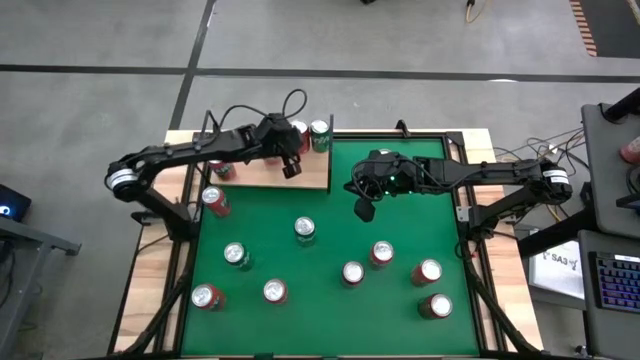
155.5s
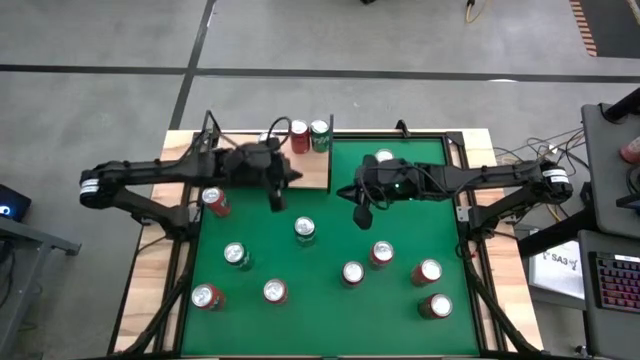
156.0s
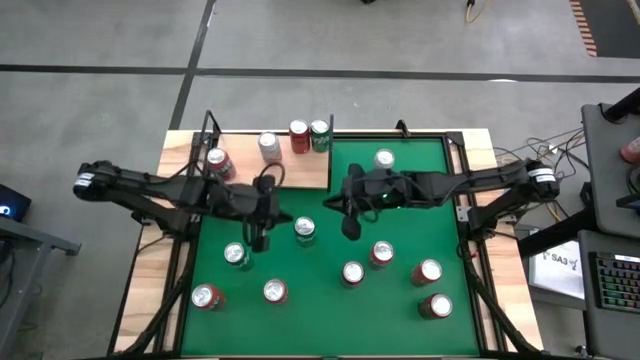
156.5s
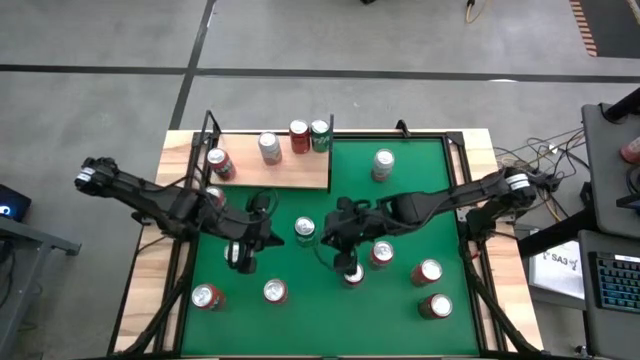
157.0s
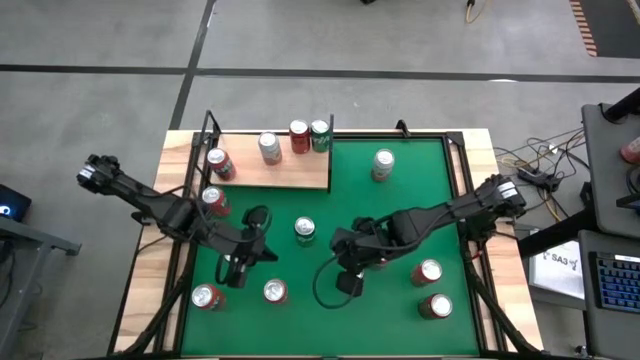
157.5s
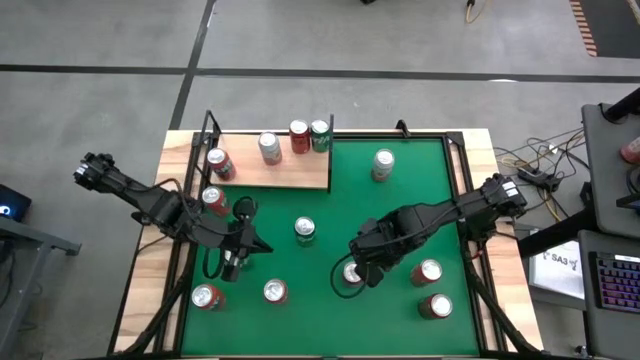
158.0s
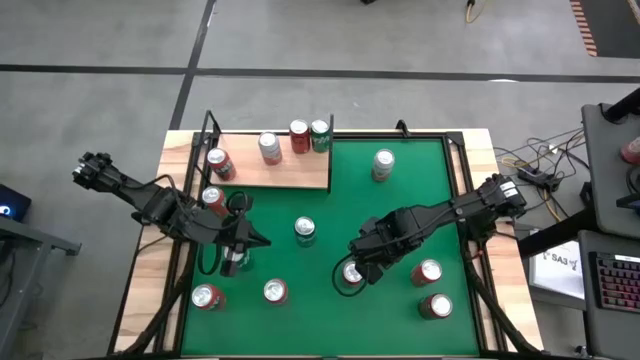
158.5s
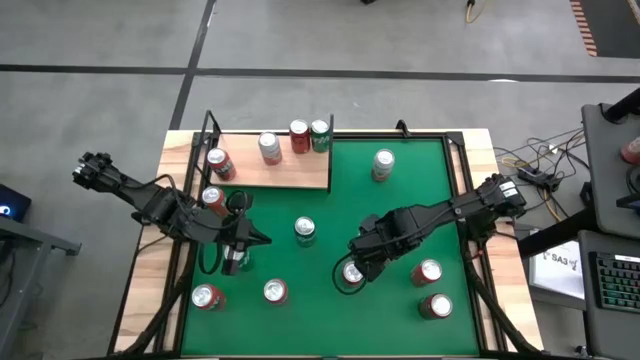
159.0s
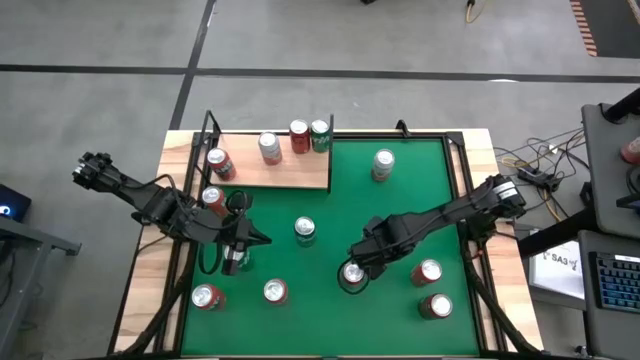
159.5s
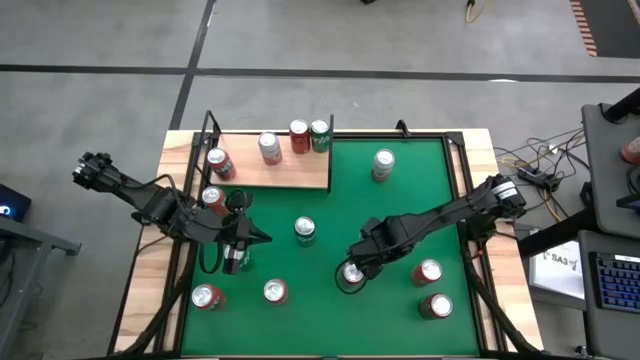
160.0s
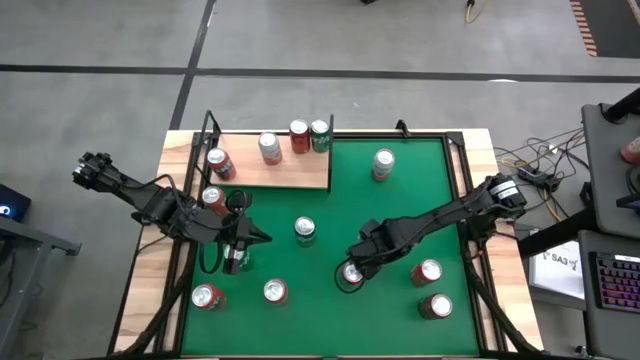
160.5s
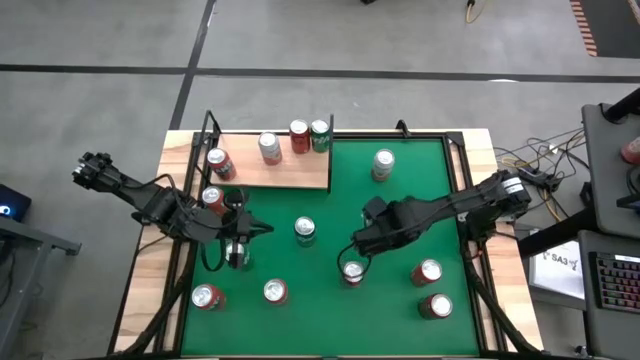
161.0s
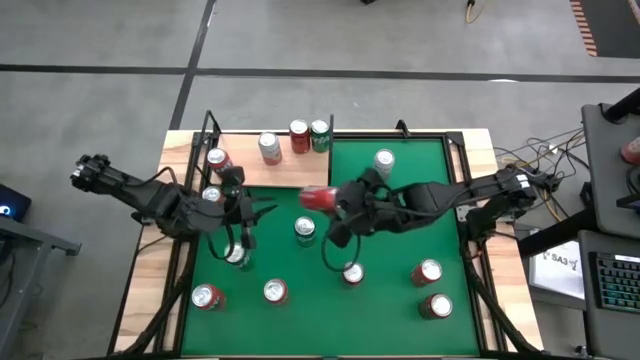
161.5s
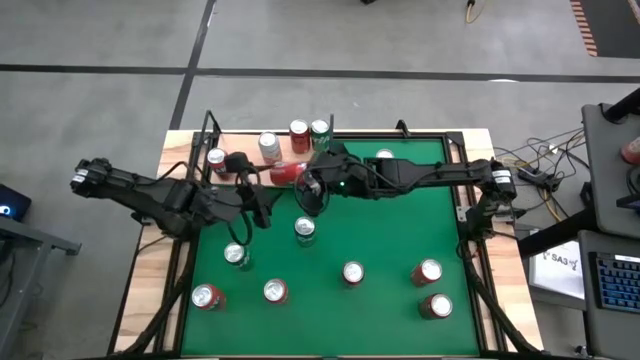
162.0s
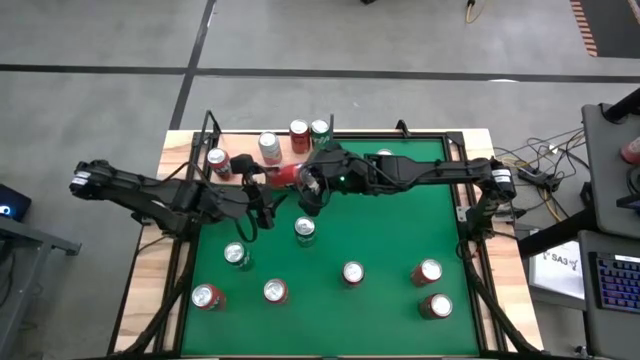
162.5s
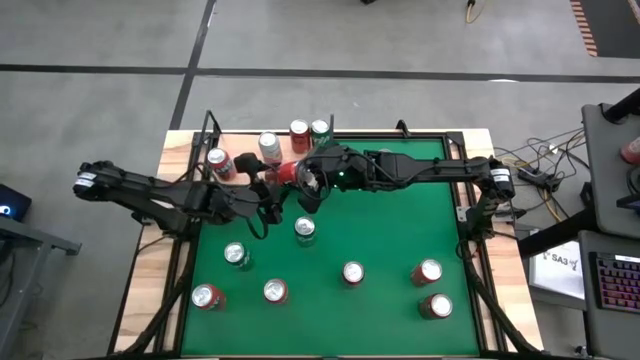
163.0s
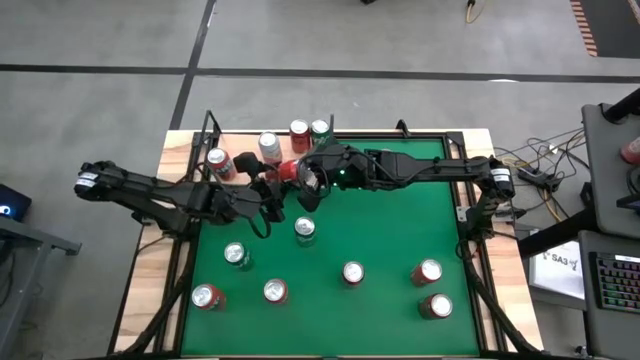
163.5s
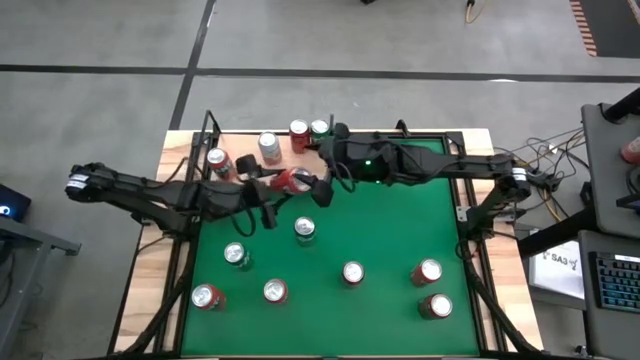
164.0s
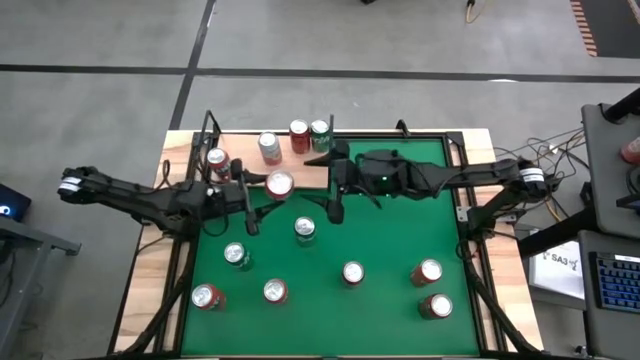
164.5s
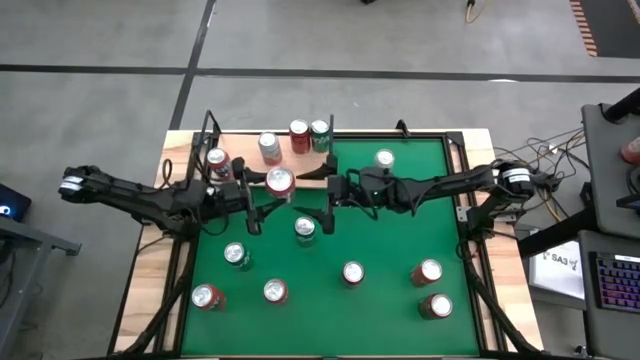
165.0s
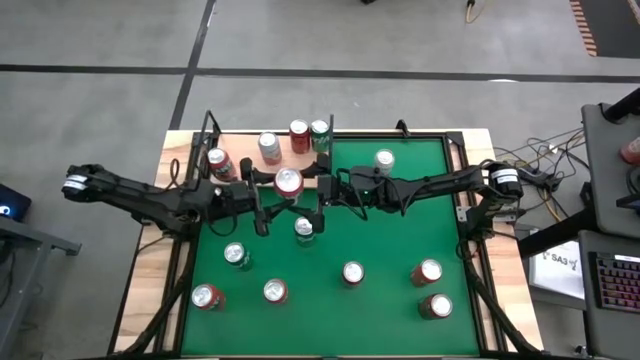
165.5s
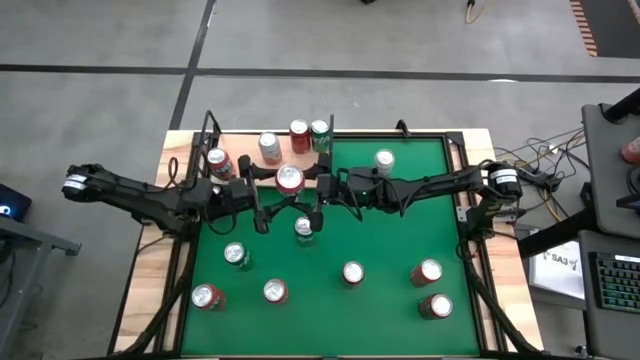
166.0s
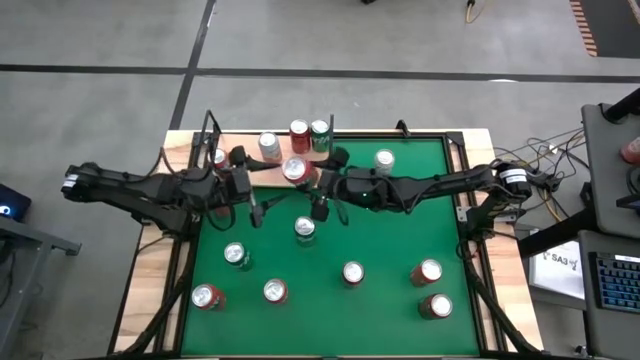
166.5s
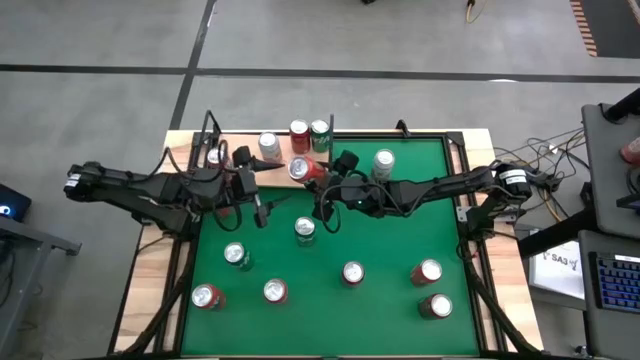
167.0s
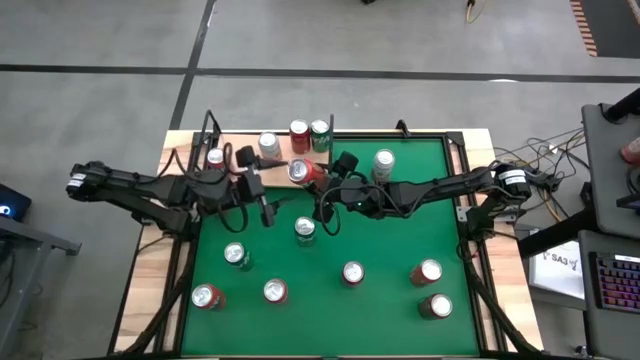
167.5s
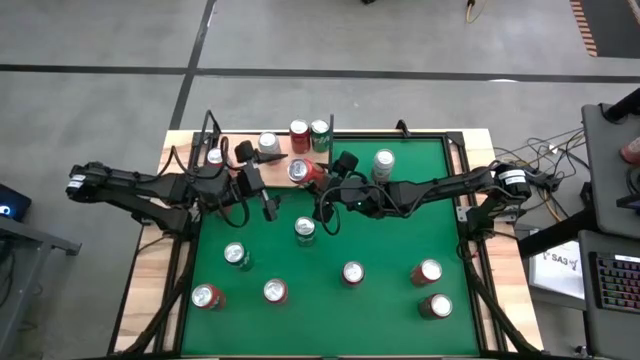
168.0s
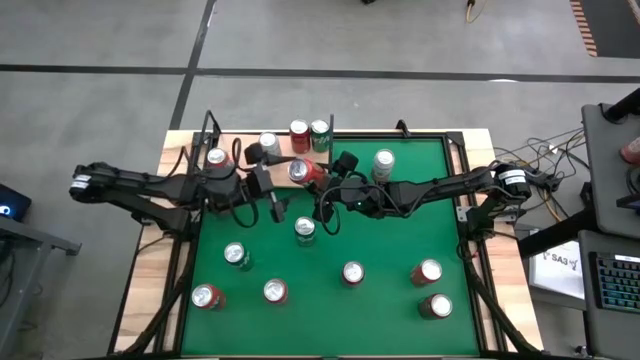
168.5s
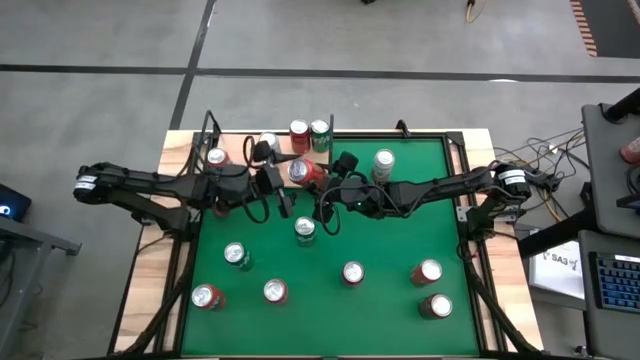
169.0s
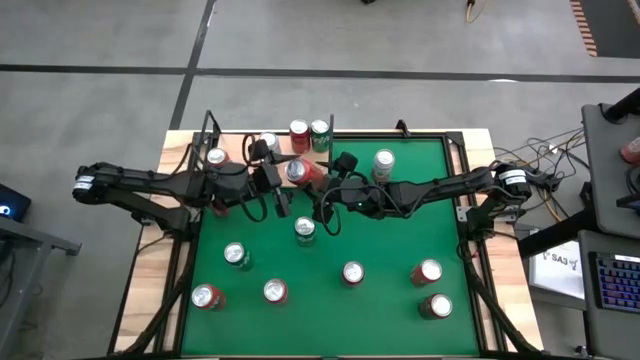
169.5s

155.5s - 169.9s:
Task: Place canned beverage on shelf
Put the red soda can on the shelf aligned with the other red soda can

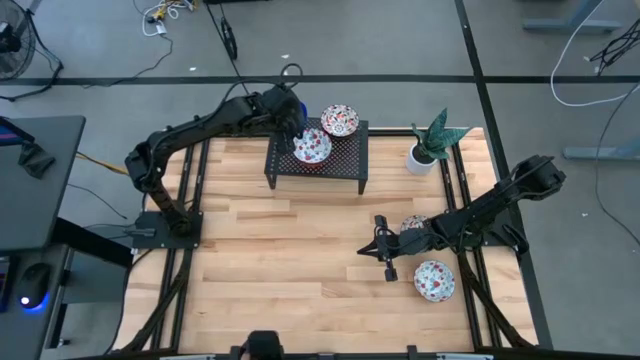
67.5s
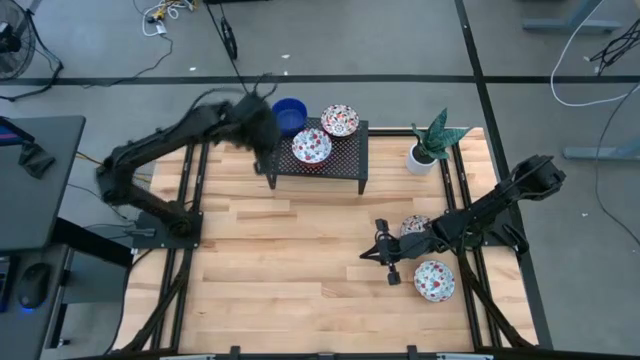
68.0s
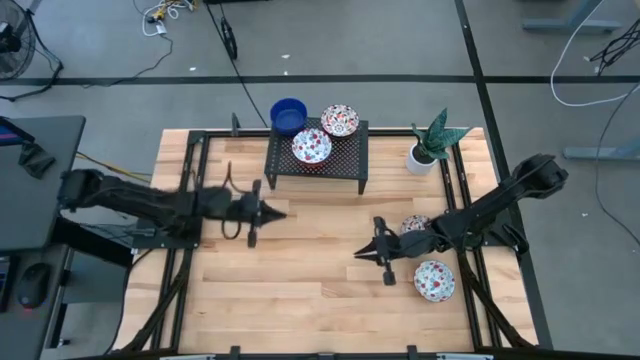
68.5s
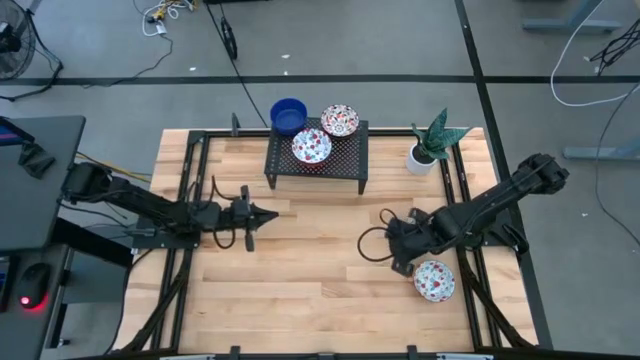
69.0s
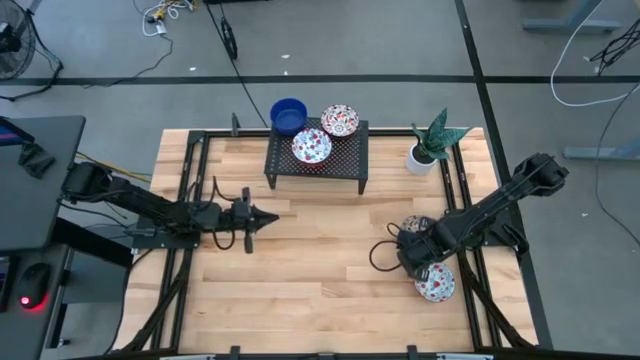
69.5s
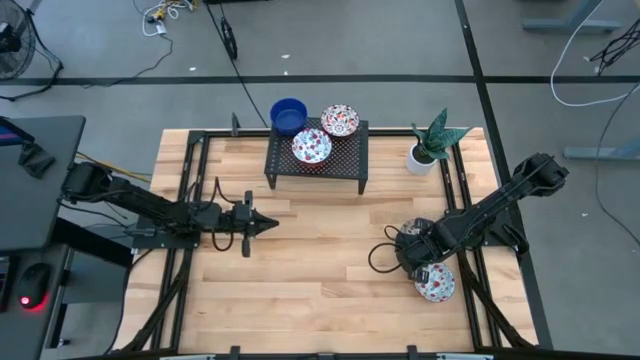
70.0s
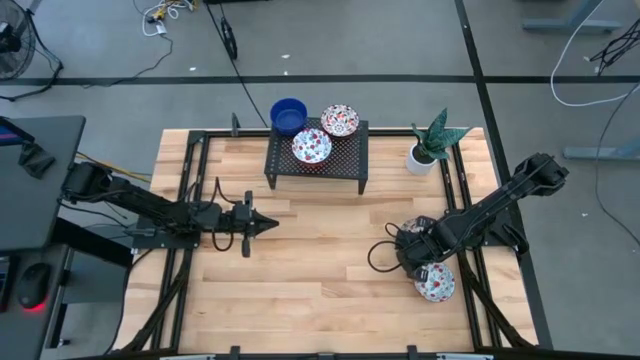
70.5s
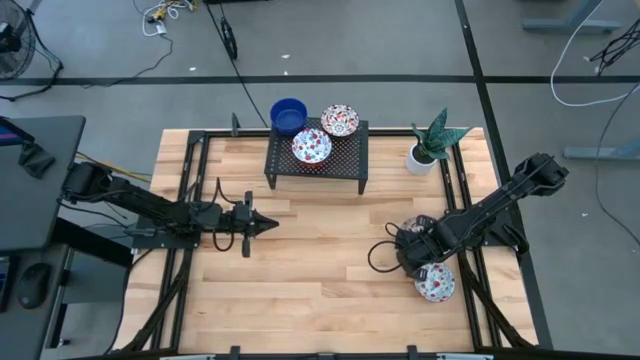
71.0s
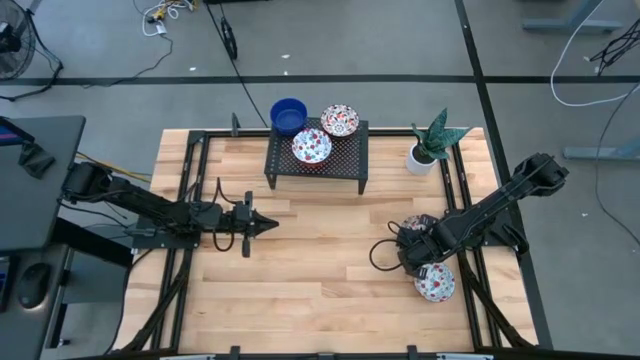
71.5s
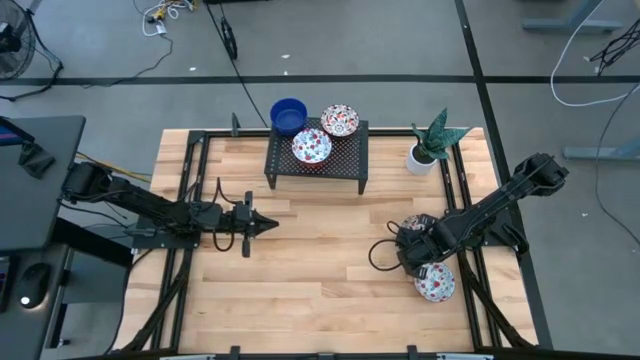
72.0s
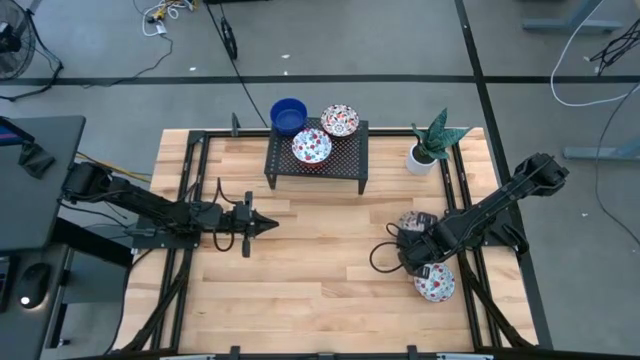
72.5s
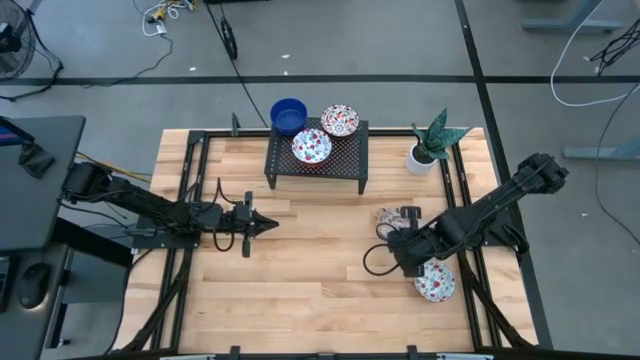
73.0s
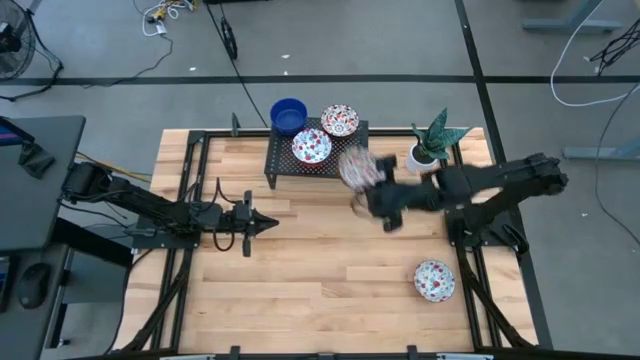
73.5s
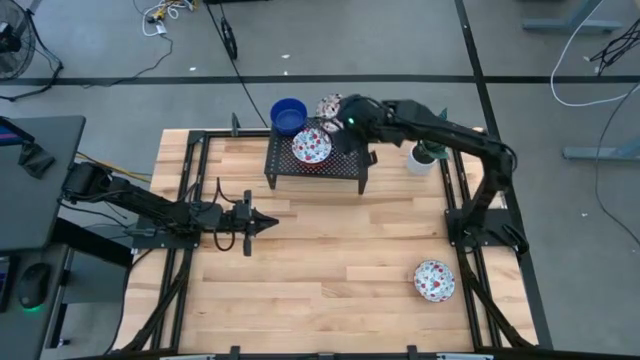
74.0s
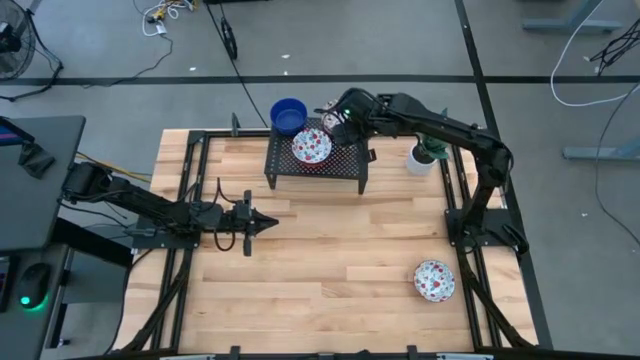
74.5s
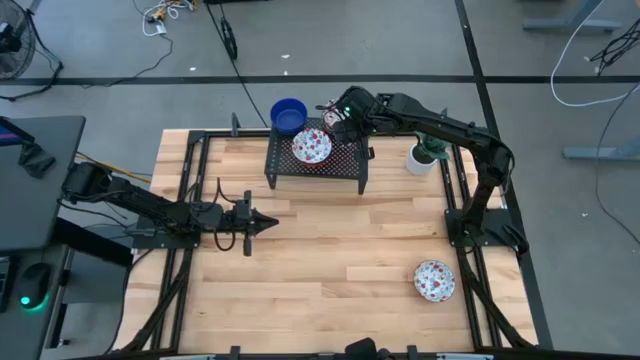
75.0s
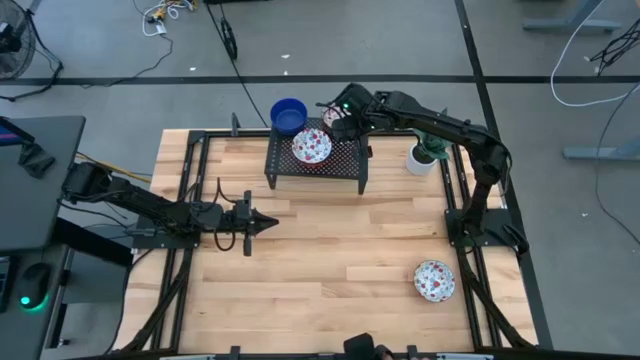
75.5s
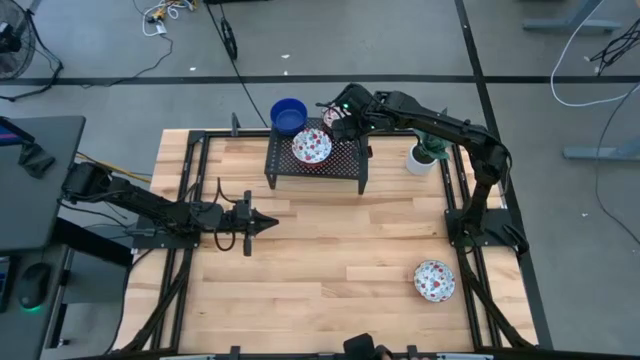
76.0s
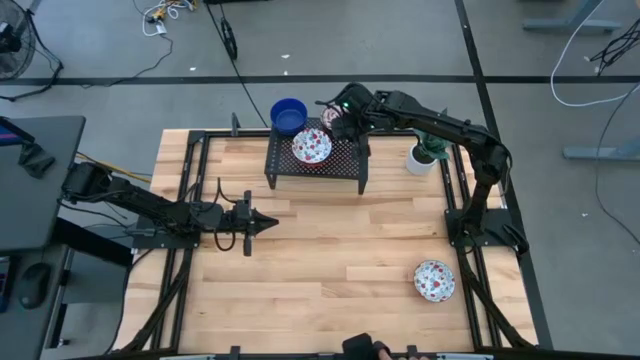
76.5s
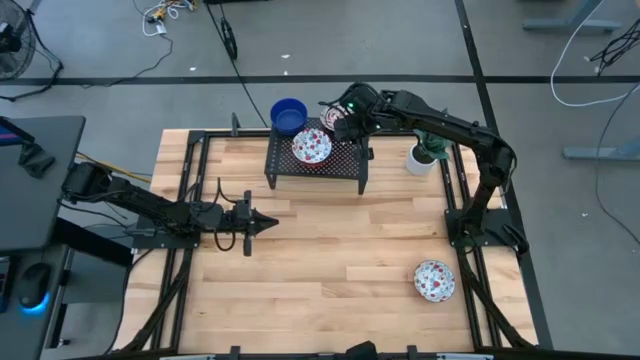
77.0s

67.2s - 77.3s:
Task: Pick & Place Mini bowls
Stack the orange bowl on top of the other orange bowls on the shelf
